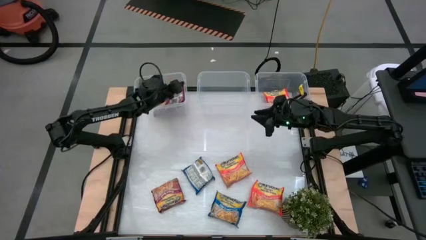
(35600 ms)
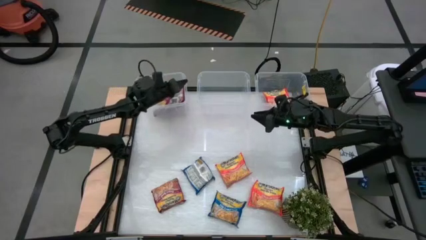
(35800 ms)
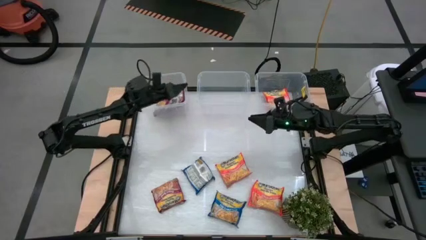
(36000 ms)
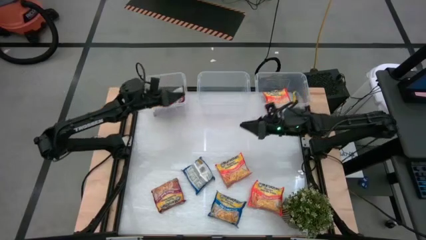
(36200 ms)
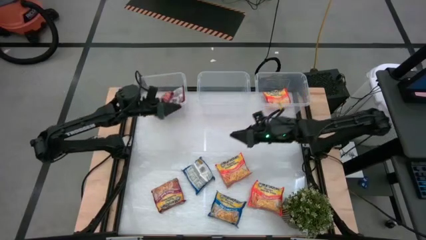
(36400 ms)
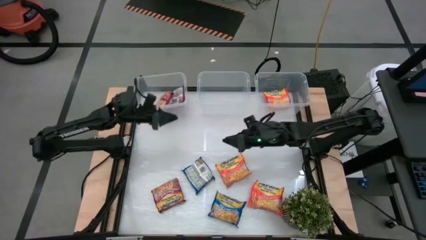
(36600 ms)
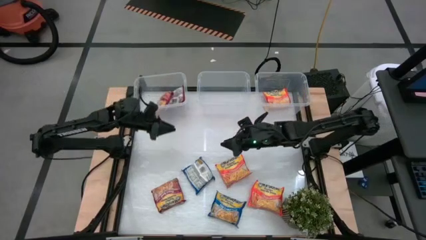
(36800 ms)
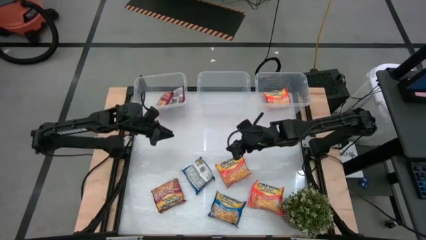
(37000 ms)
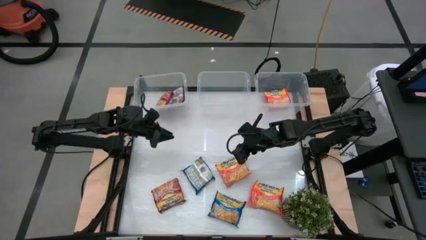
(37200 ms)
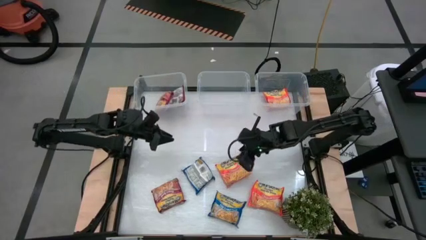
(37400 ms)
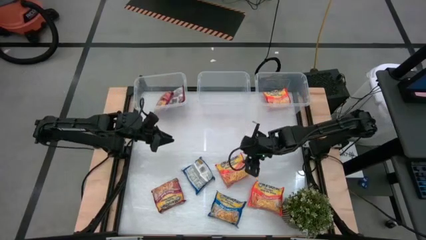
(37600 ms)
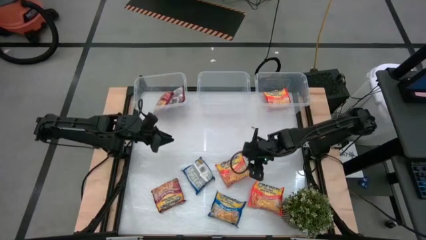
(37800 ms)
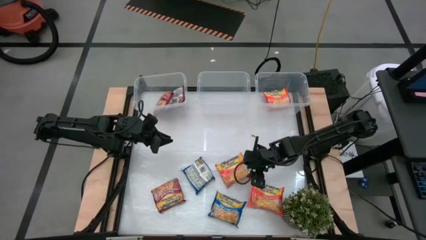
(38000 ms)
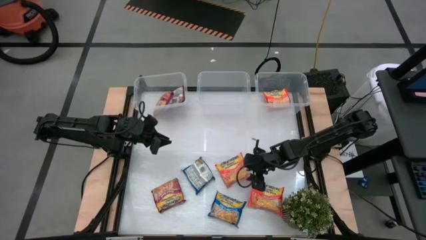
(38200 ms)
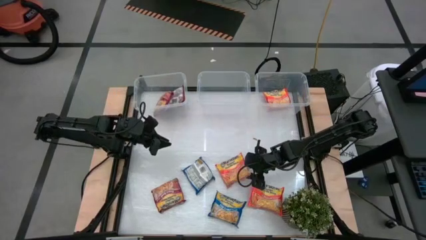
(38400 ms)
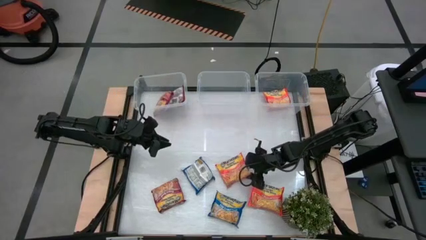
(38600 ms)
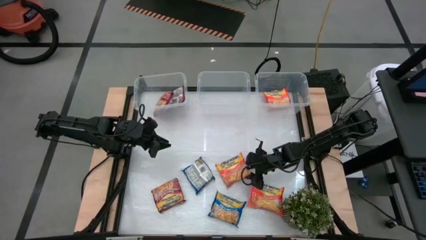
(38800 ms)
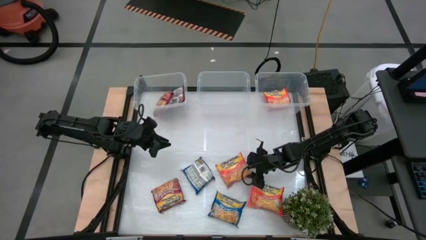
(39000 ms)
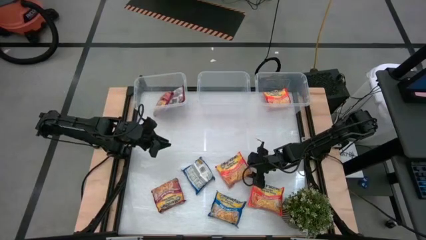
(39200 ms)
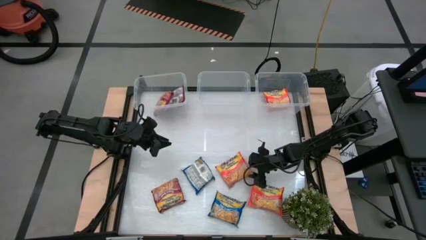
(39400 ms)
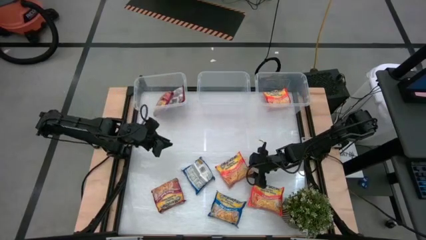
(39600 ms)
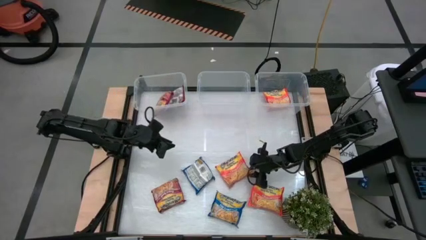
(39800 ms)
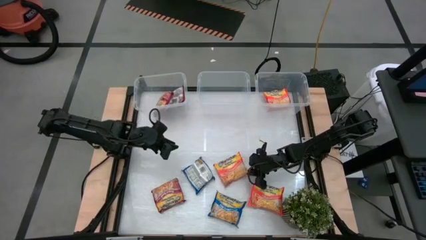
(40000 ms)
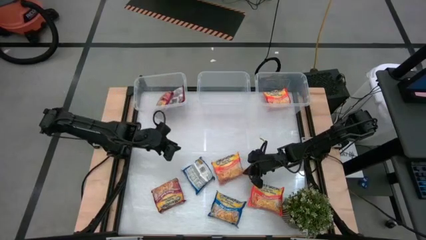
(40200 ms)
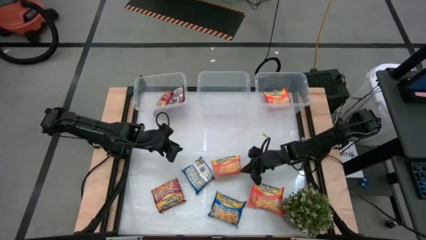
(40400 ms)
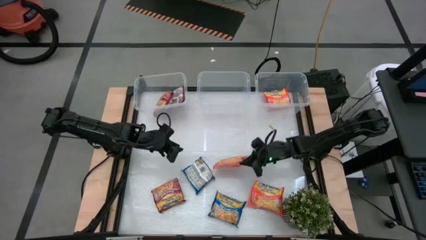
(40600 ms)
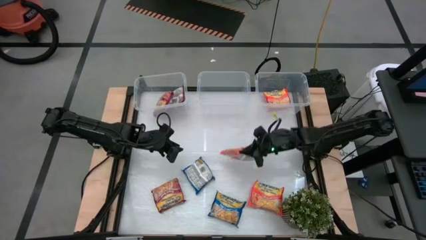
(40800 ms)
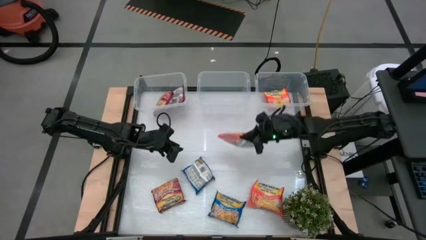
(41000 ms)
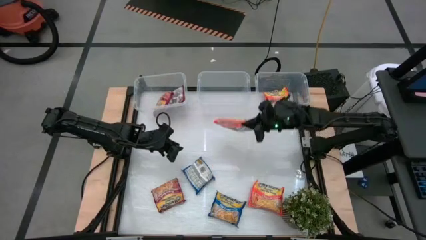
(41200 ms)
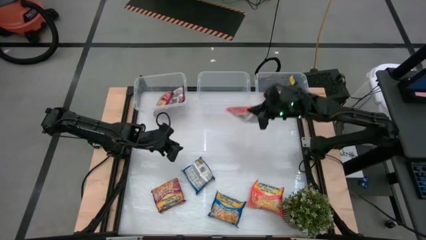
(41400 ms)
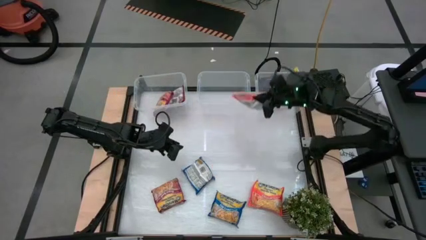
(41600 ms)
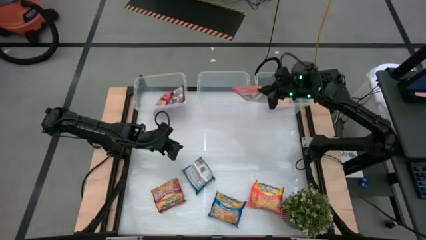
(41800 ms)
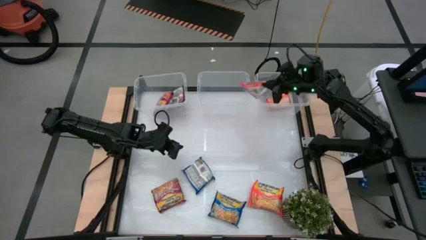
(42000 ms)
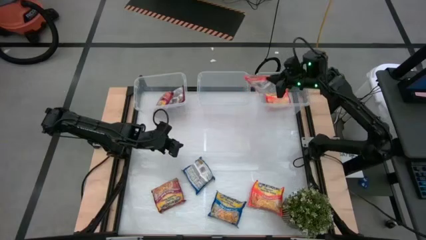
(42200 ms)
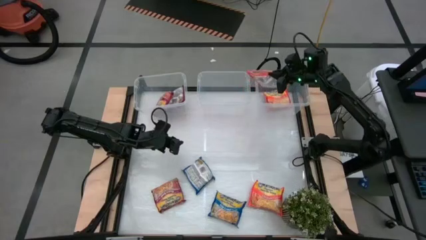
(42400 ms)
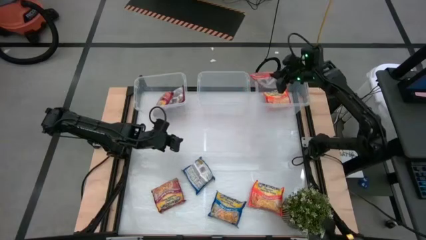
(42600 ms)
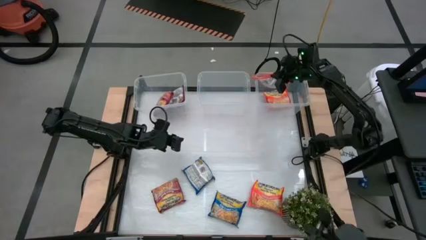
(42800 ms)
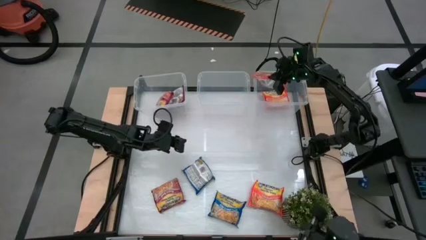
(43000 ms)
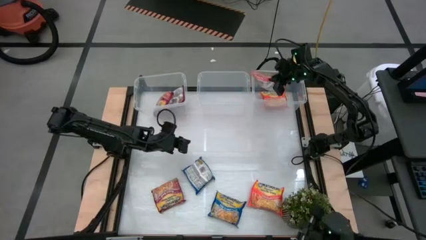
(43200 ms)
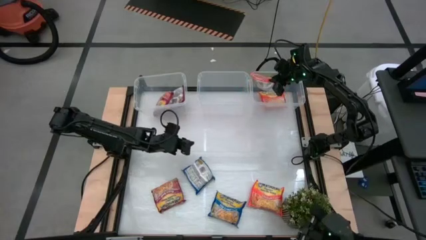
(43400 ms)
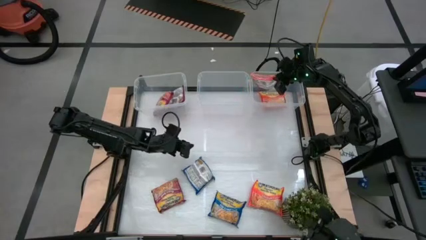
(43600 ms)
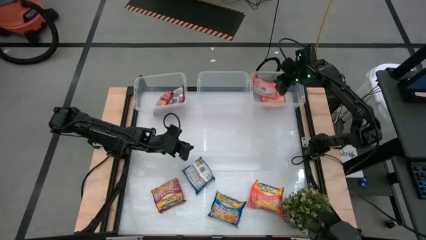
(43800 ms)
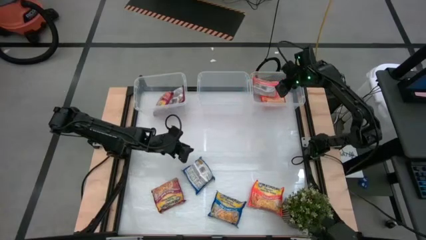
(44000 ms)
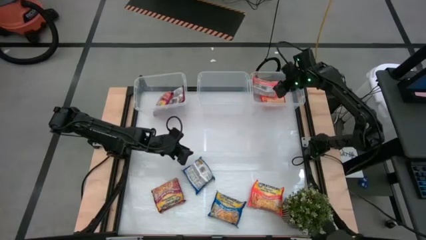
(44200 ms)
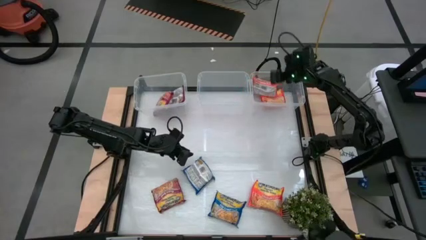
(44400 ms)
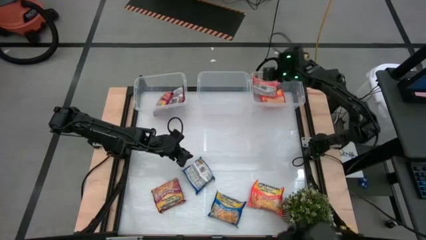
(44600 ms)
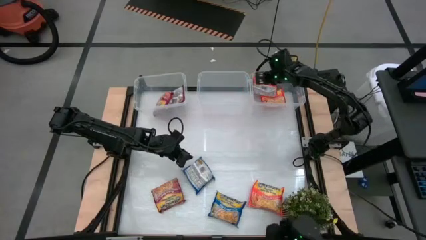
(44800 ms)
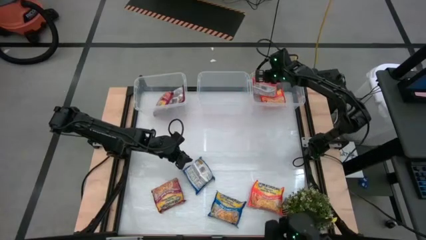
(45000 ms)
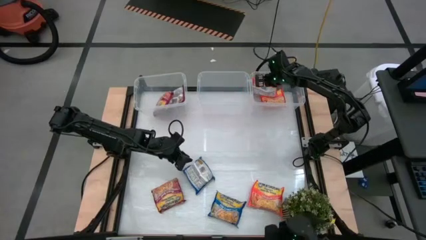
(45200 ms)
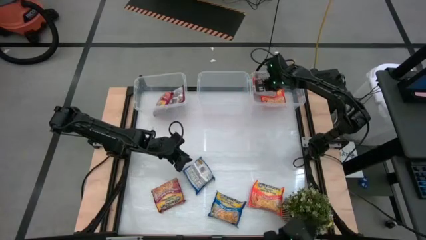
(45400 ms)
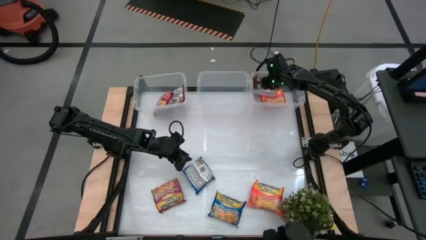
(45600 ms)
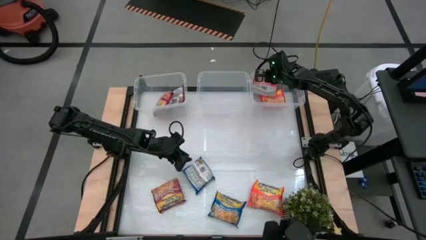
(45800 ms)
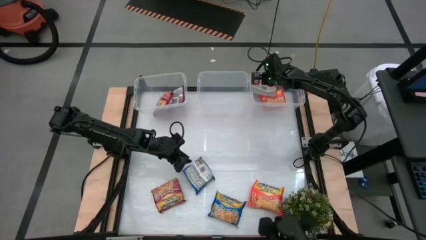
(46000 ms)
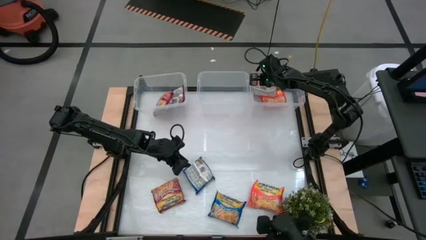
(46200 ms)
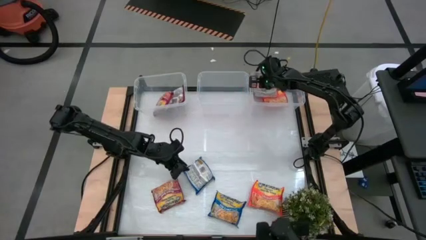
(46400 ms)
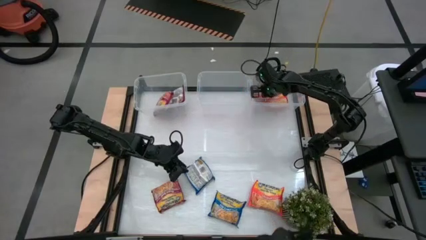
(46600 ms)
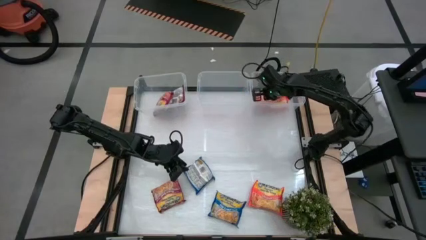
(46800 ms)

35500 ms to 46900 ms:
Task: Sort Maruchan noodles
Put the top orange noodle pack into the right transparent bin

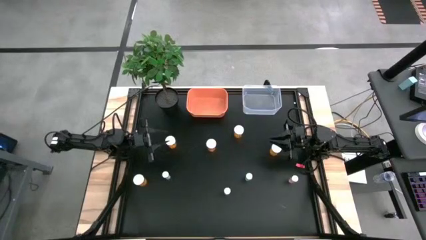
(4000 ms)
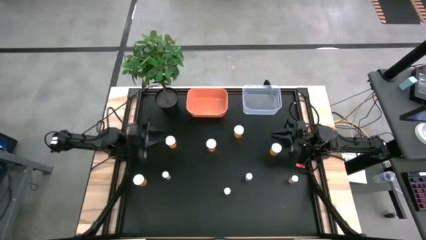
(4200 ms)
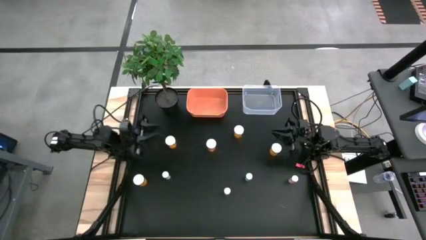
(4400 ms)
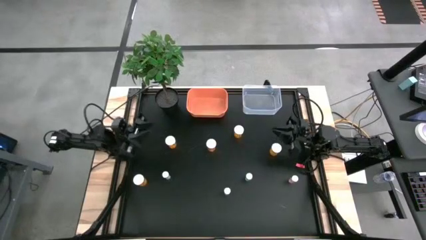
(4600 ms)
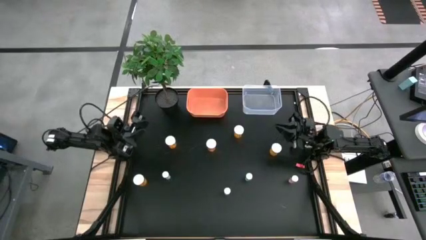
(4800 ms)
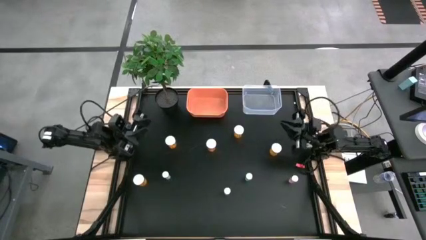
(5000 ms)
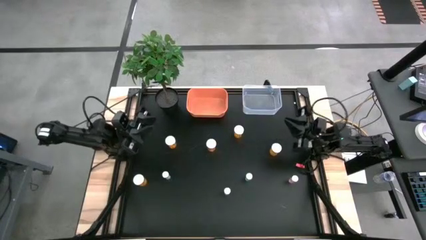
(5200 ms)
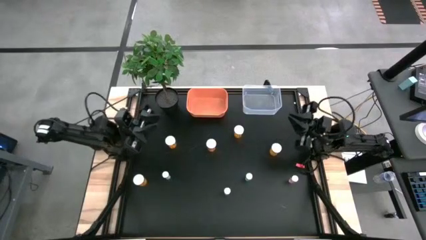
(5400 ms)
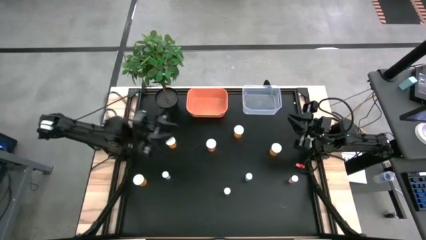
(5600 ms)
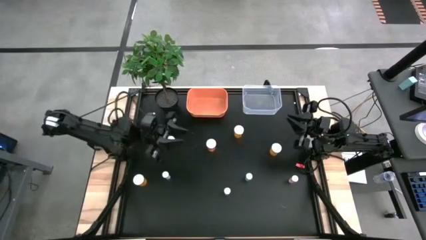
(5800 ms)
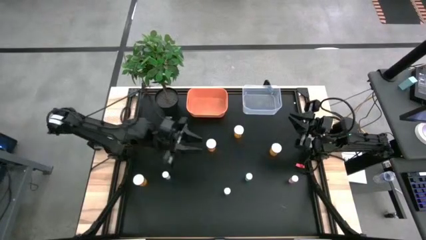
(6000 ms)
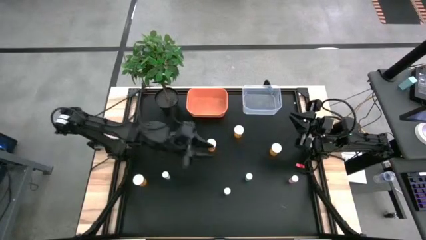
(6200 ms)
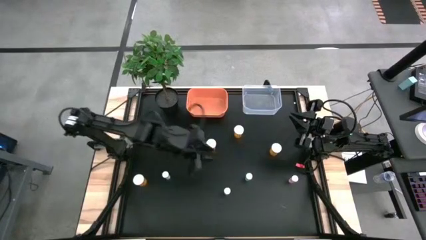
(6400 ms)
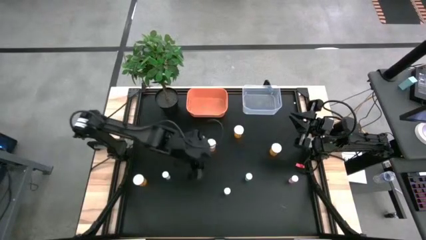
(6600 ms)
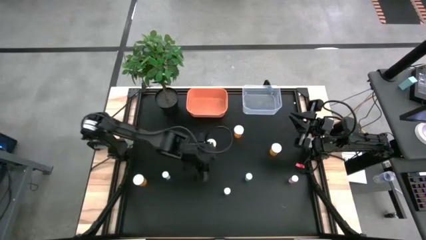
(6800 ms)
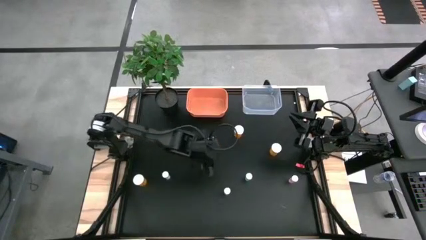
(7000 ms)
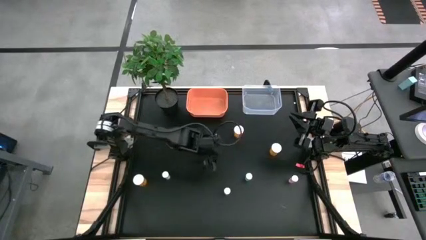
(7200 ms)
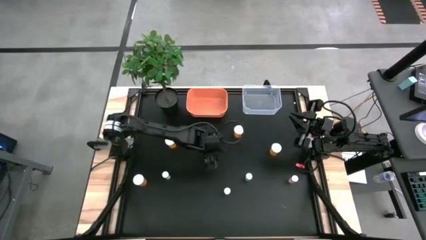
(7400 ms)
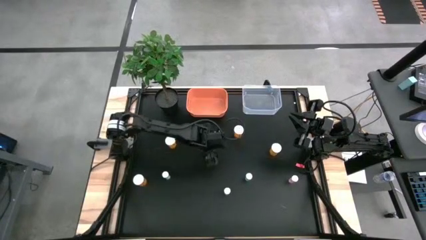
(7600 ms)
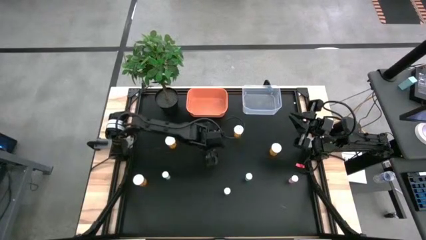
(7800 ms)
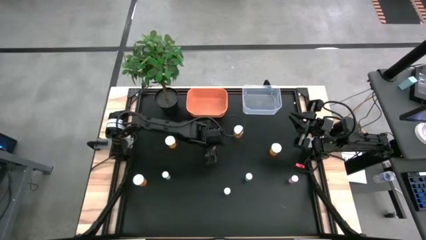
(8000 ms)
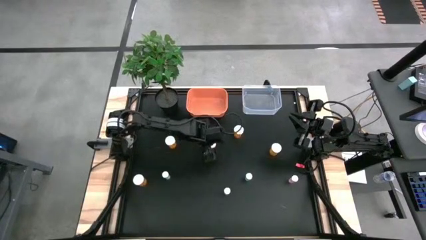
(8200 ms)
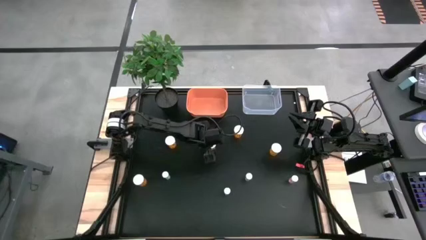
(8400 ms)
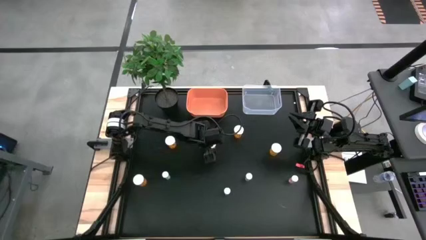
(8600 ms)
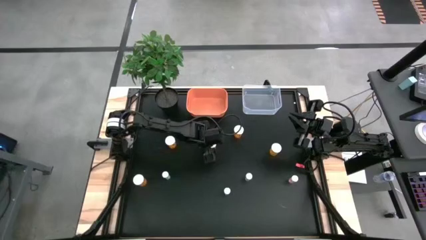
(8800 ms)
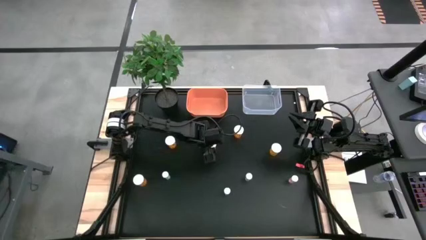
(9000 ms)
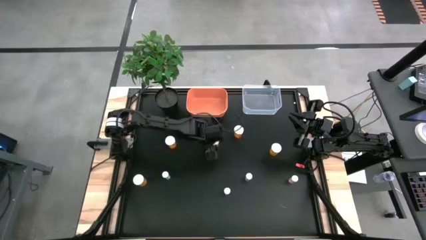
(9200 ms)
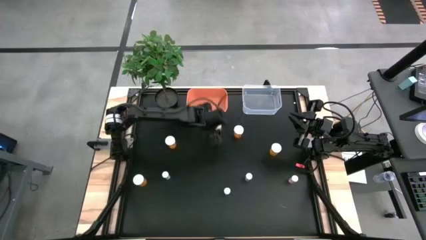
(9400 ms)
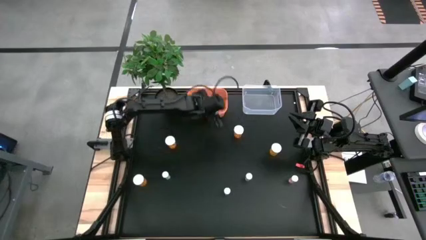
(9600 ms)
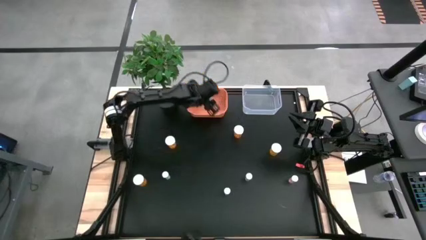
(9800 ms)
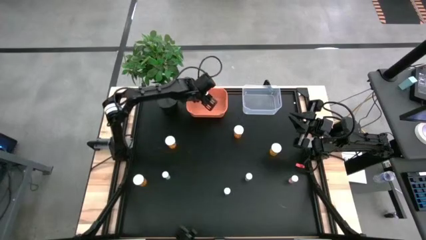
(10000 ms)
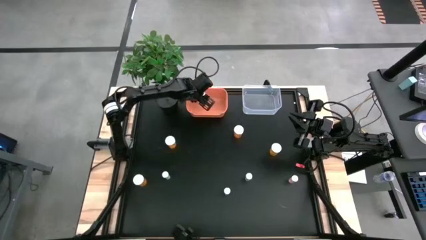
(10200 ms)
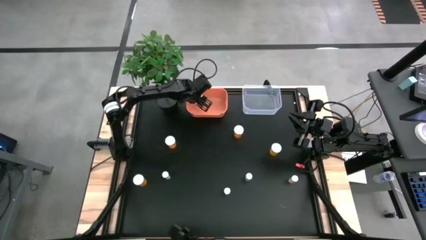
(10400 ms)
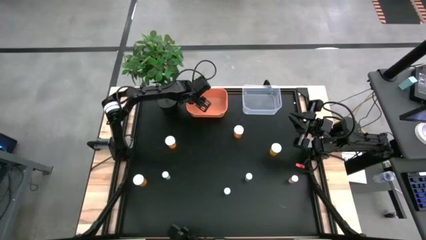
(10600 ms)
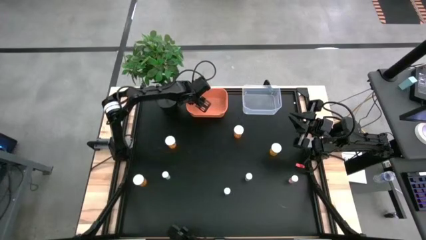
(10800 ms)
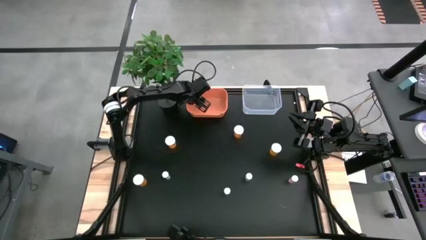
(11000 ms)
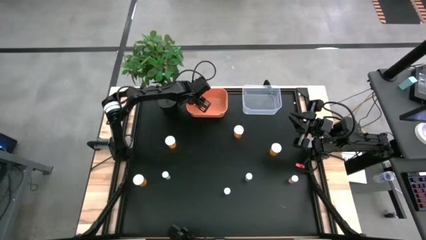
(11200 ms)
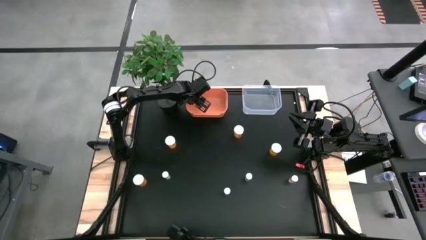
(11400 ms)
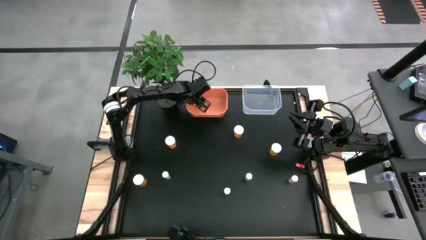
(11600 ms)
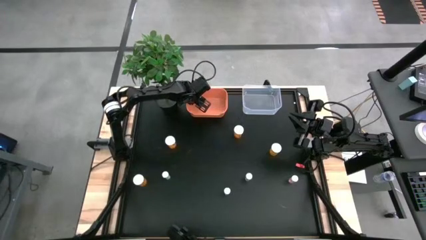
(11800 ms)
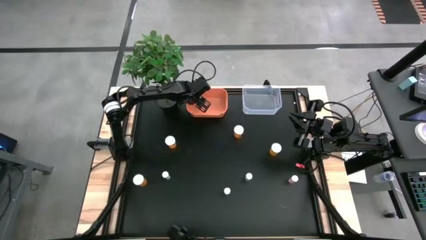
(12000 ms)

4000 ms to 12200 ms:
Task: Pick and place medicine bottles into bin by pill shape (circle, oval)
Put the orange pill bottle into the orange bin
